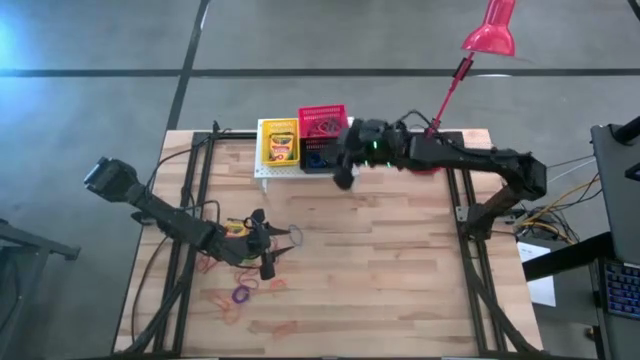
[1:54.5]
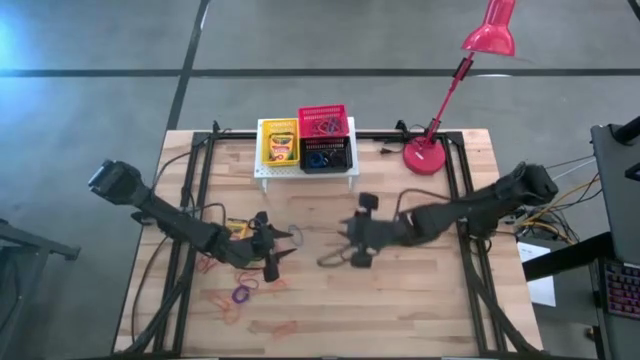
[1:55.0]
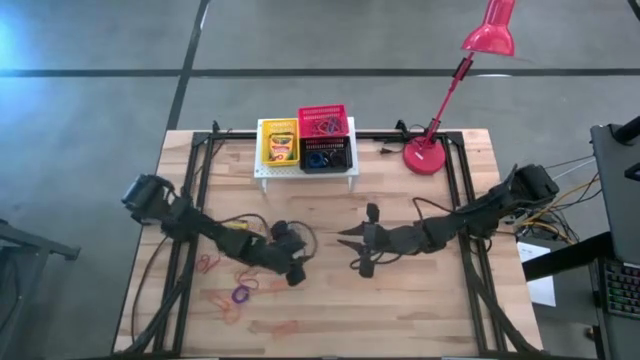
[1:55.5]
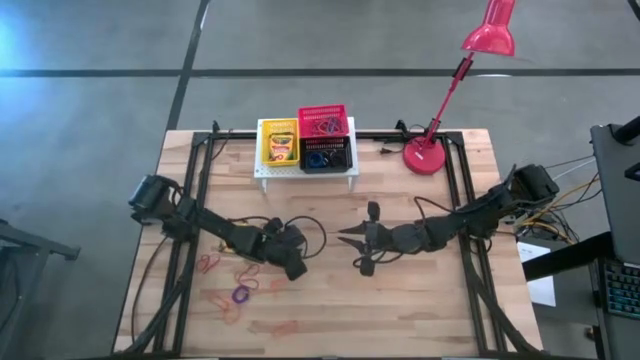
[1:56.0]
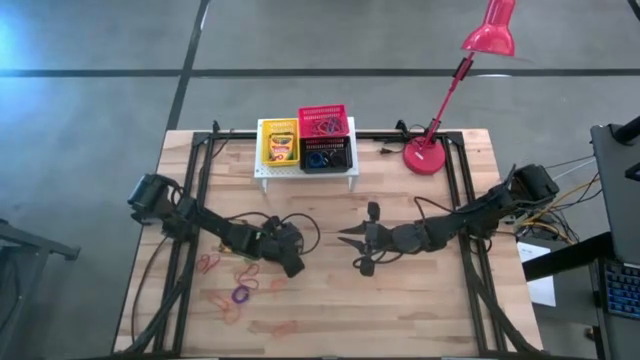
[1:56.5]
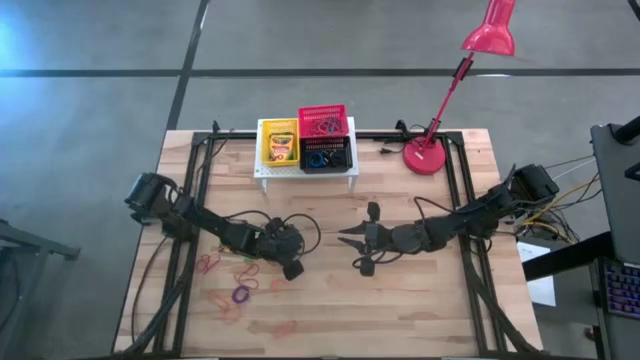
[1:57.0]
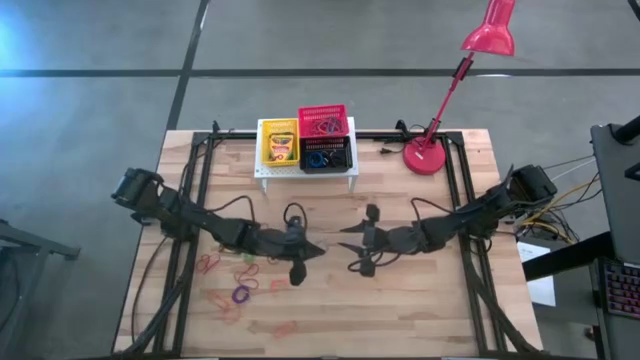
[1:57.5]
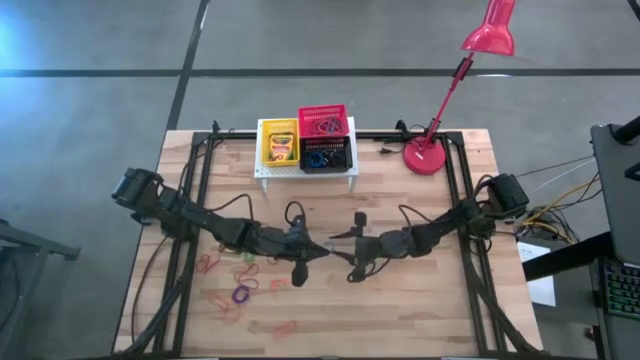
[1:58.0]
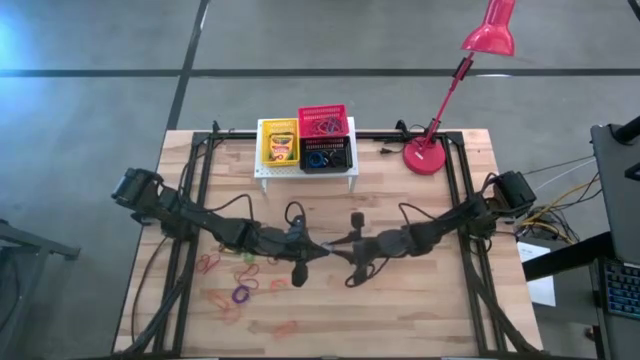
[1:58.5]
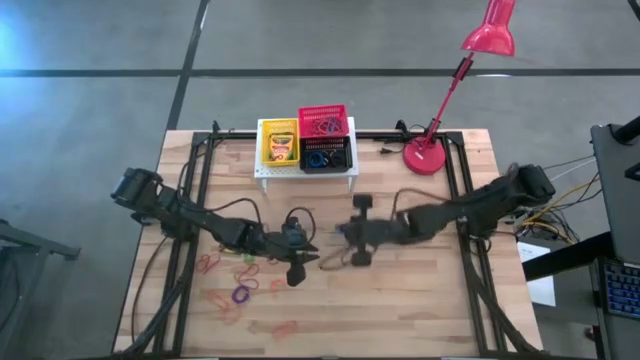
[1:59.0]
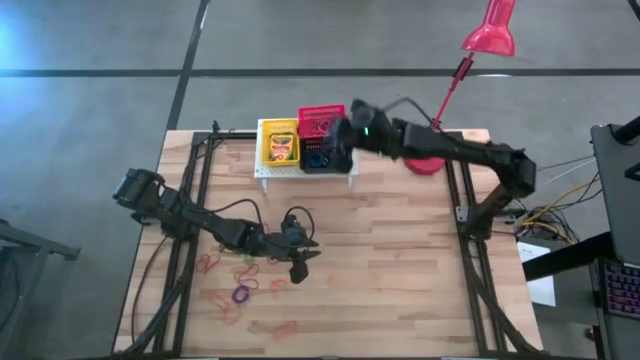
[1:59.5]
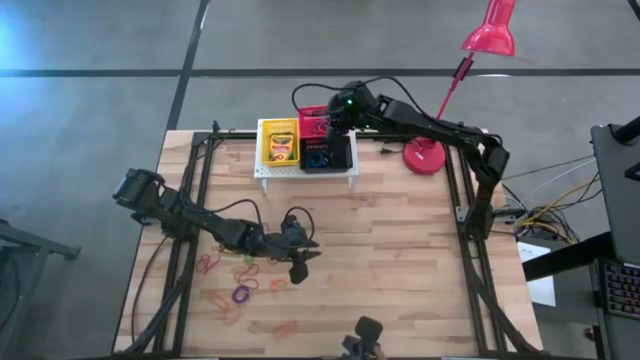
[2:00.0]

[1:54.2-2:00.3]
Task: Pick & Place Office Desk Supplies
Put the blue rubber band into the red bin

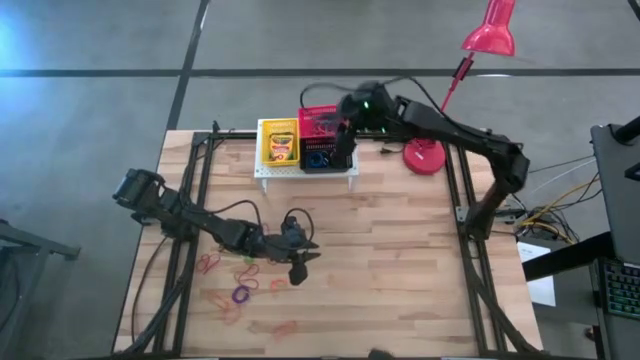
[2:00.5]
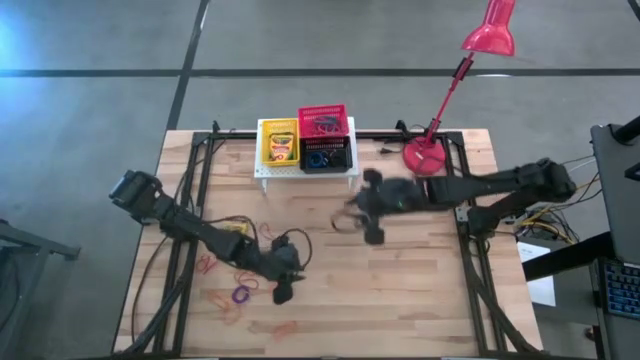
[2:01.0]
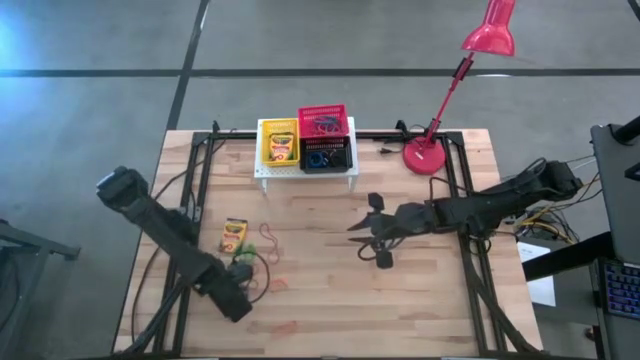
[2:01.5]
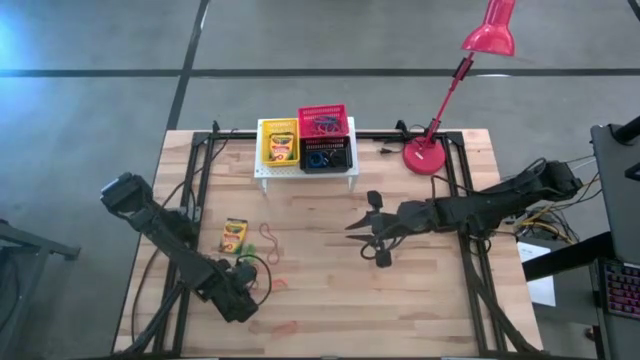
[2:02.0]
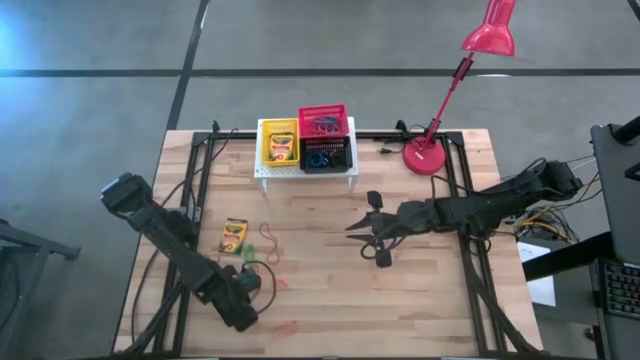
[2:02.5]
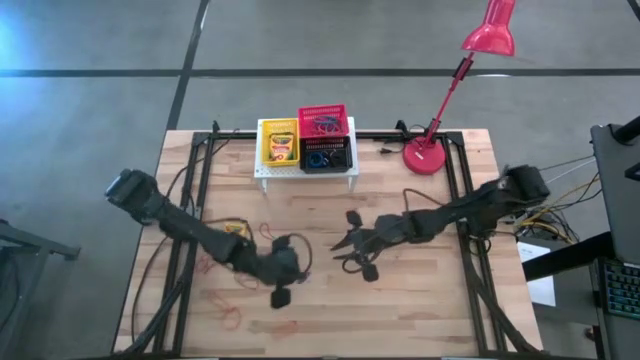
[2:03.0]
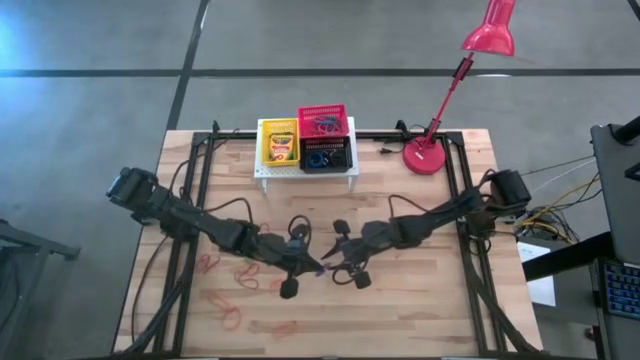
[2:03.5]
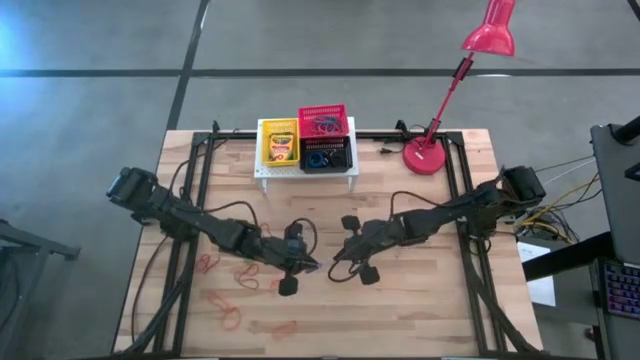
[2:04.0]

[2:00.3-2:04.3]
Put the purple spring keychain into the black bin

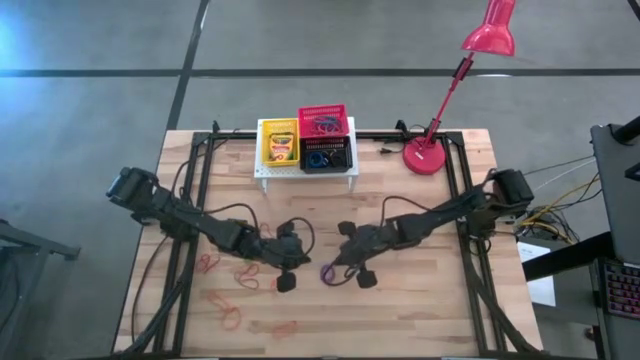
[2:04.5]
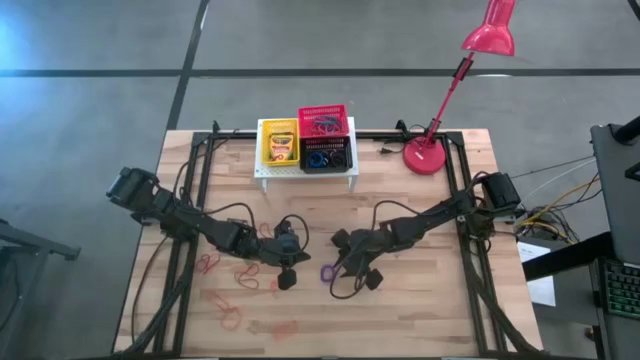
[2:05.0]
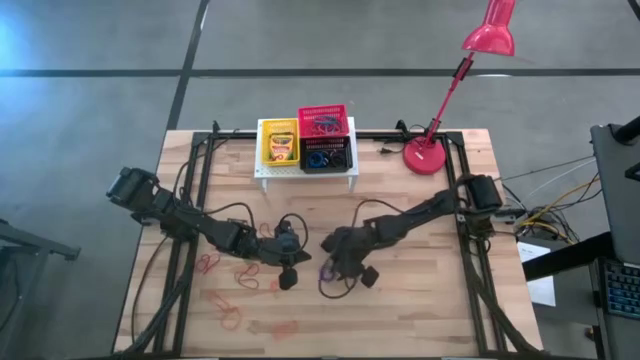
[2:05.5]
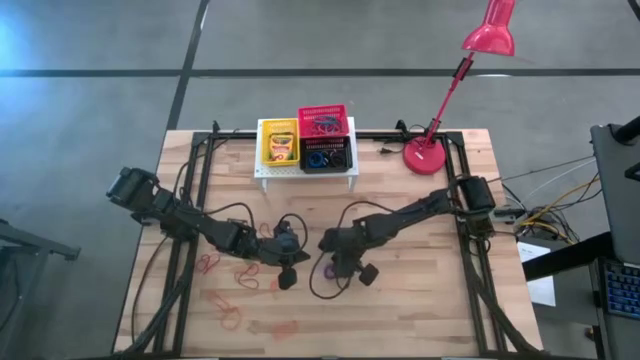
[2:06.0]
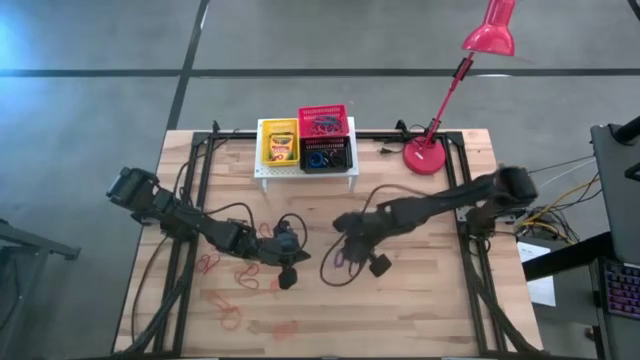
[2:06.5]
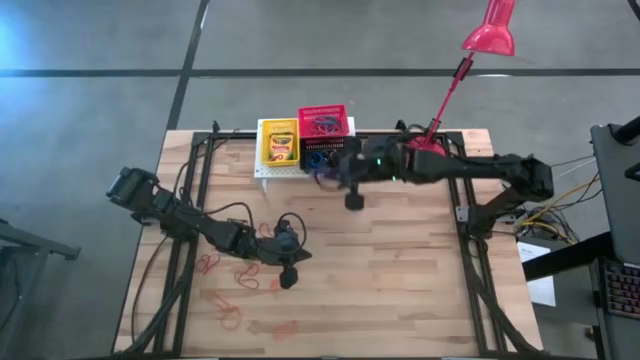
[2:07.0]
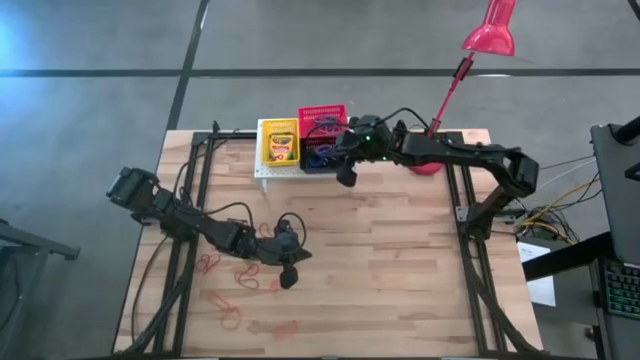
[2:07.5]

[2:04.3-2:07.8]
Put the purple spring keychain into the black bin

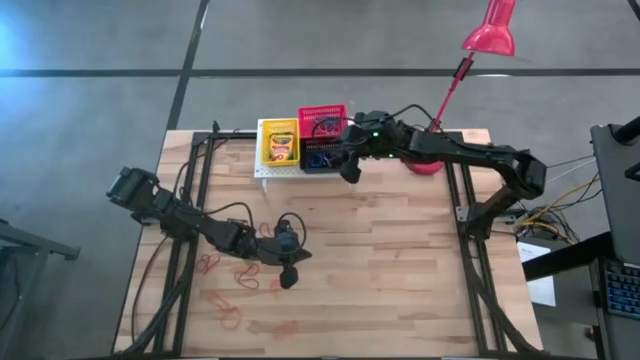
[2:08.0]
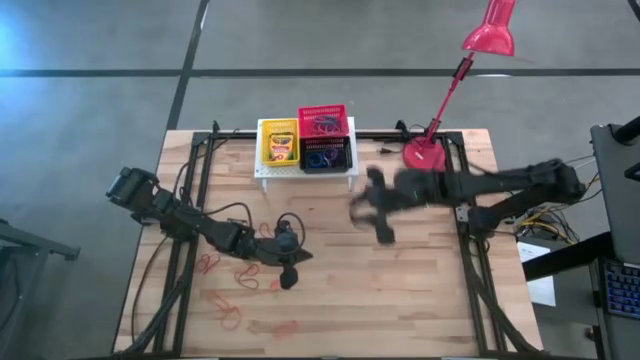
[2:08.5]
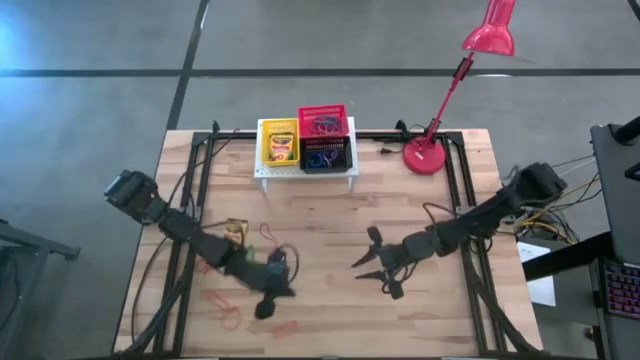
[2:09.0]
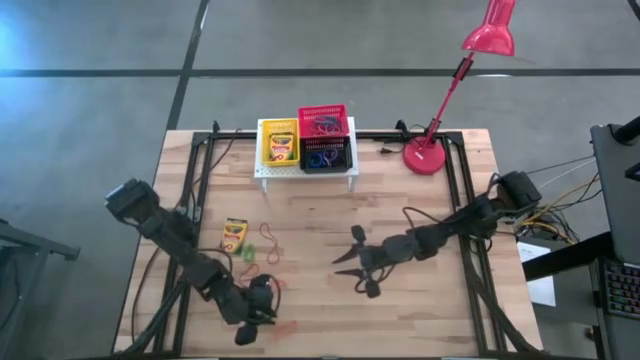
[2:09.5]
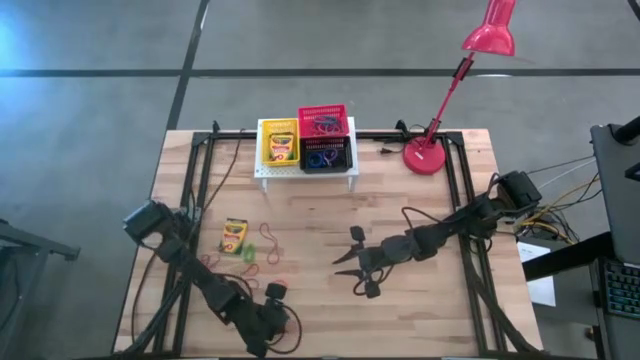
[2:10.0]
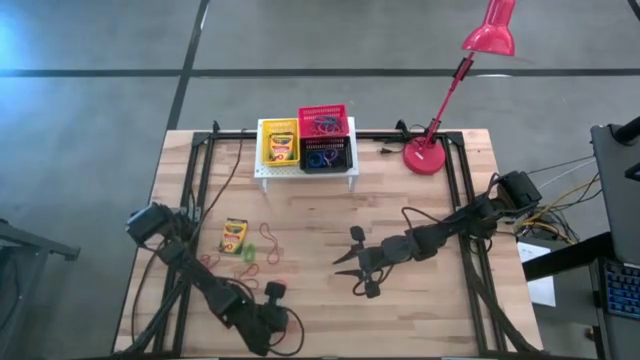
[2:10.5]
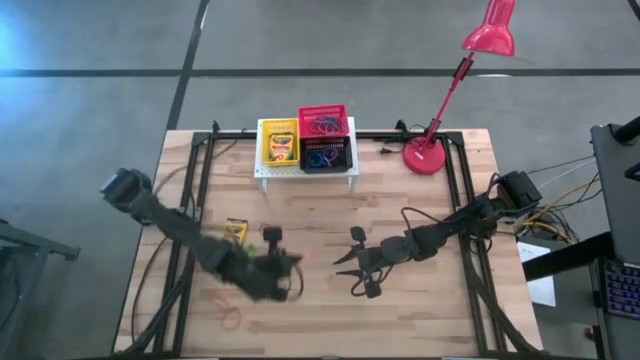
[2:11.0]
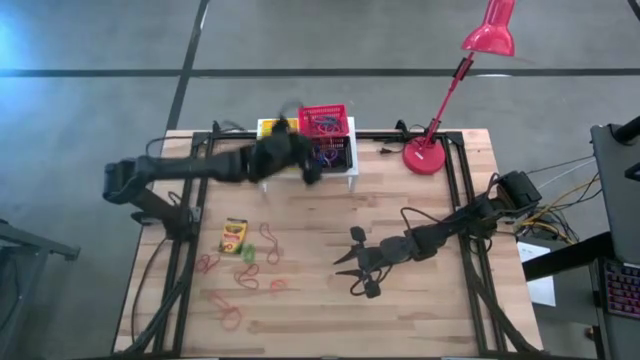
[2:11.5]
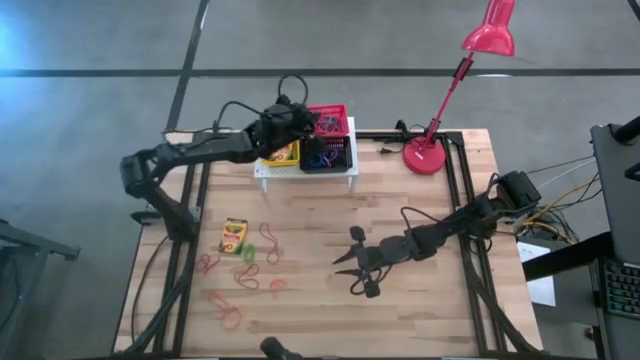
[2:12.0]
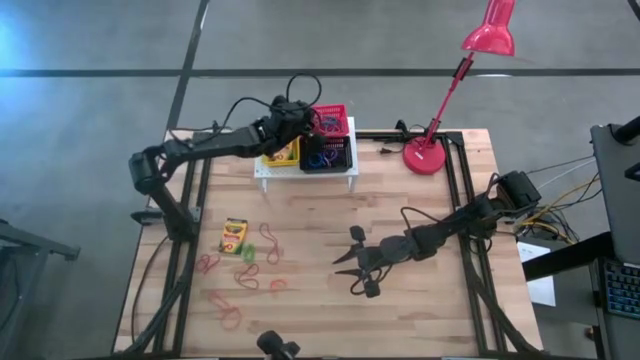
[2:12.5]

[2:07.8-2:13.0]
Put the orange rubber band into the red bin

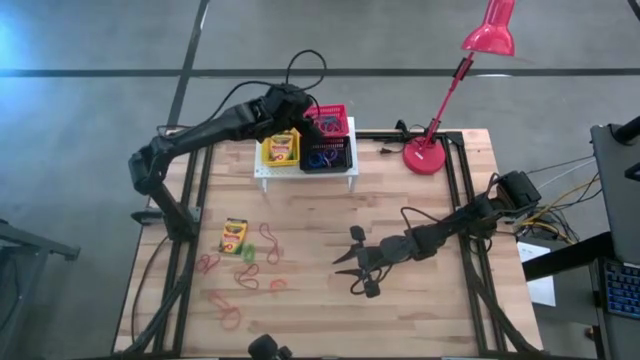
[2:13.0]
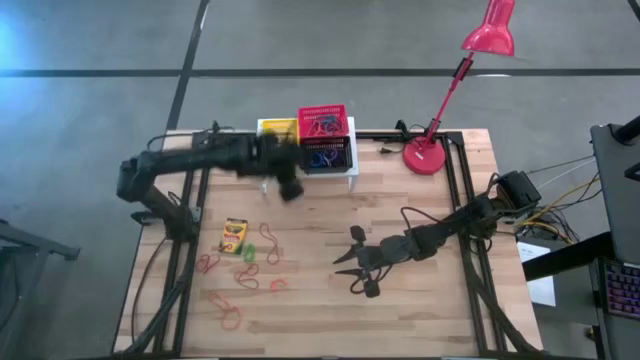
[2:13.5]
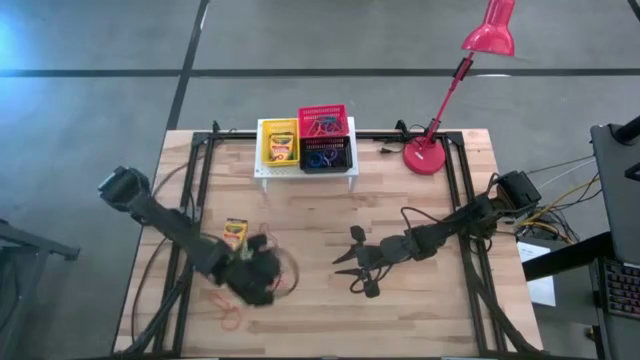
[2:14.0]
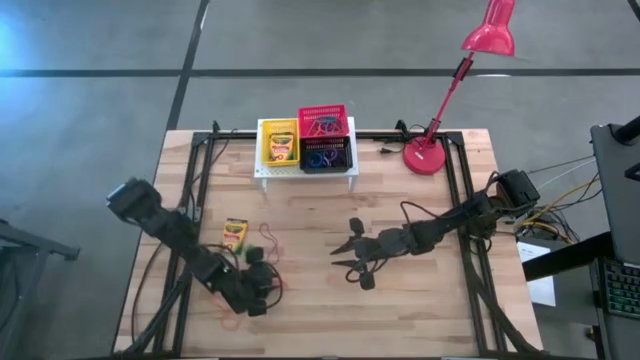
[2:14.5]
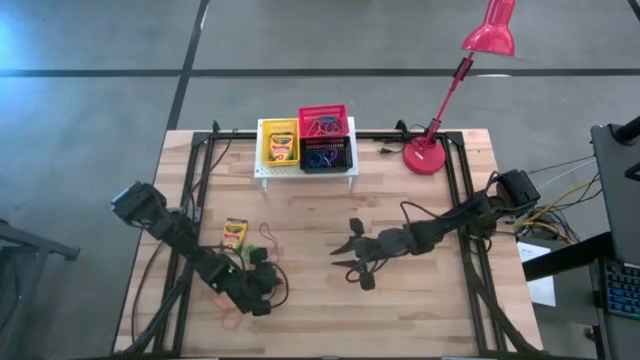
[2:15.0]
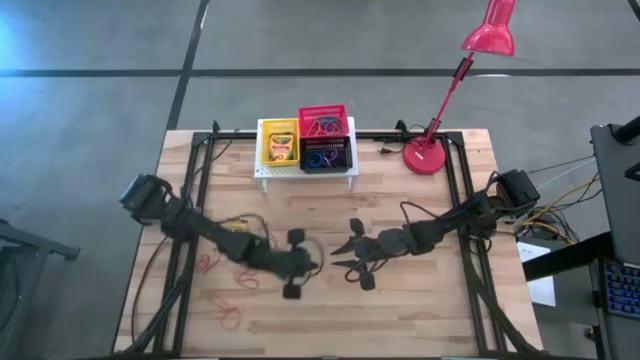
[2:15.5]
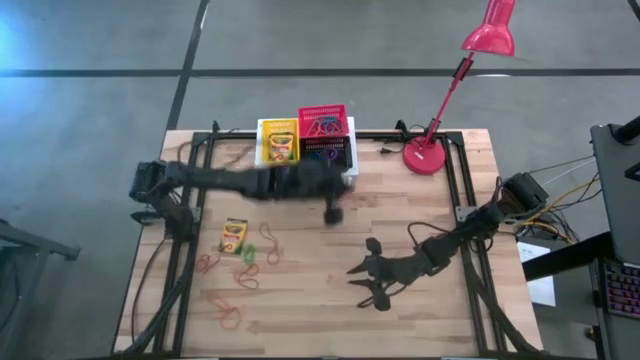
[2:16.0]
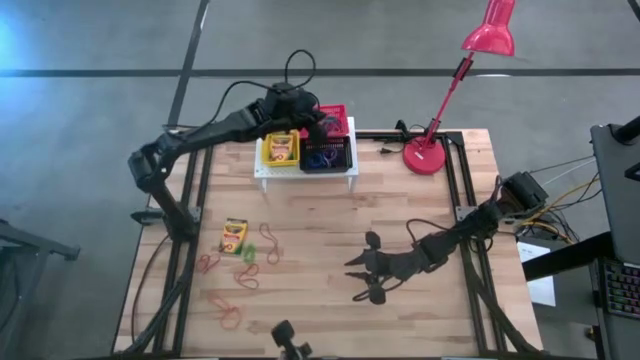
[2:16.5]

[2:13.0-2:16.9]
Put the orange rubber band into the red bin
